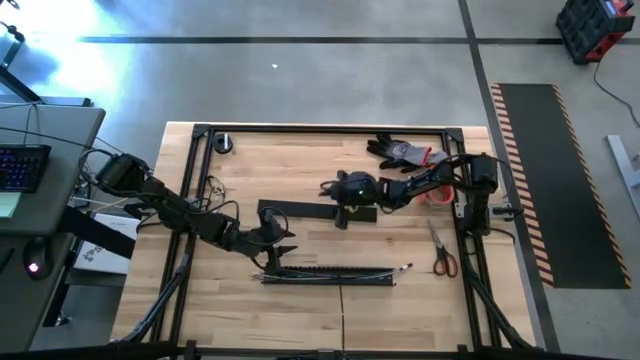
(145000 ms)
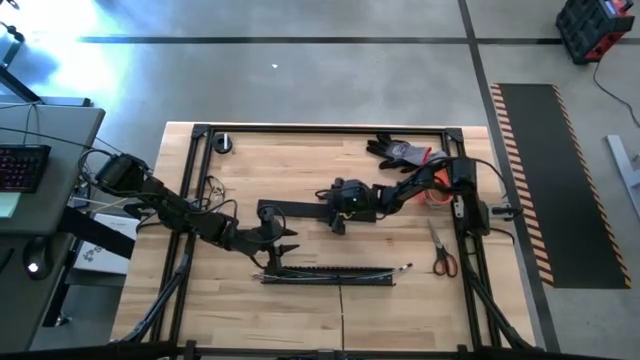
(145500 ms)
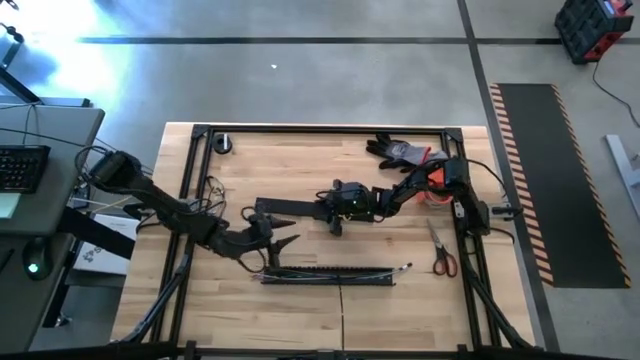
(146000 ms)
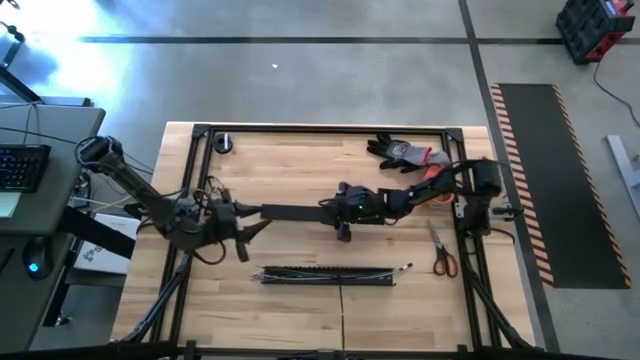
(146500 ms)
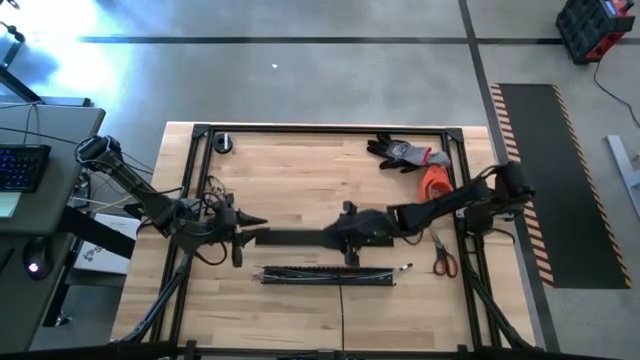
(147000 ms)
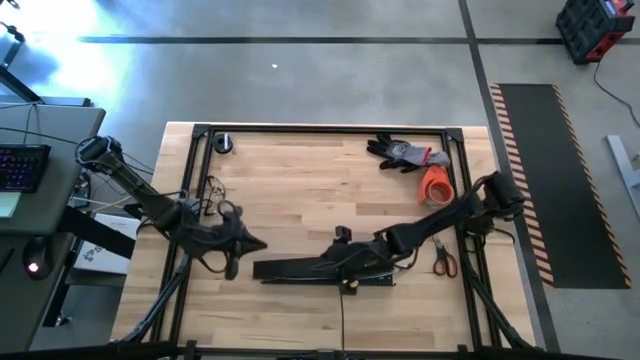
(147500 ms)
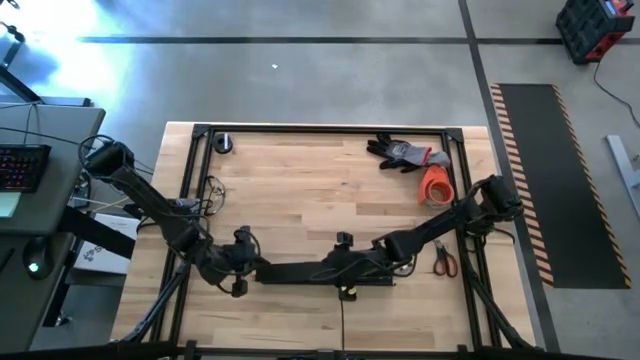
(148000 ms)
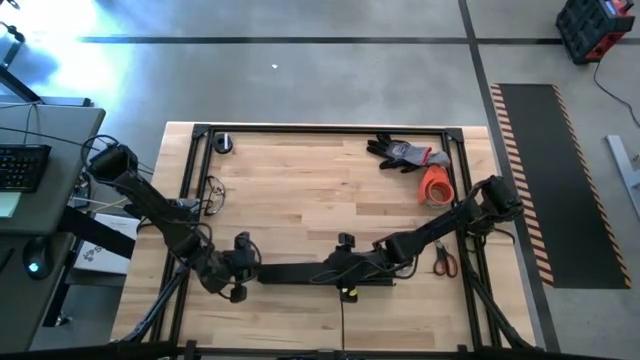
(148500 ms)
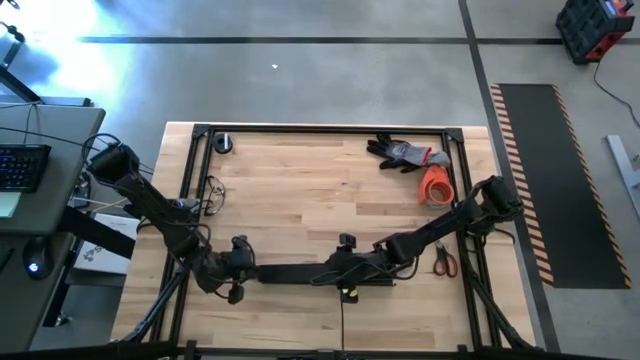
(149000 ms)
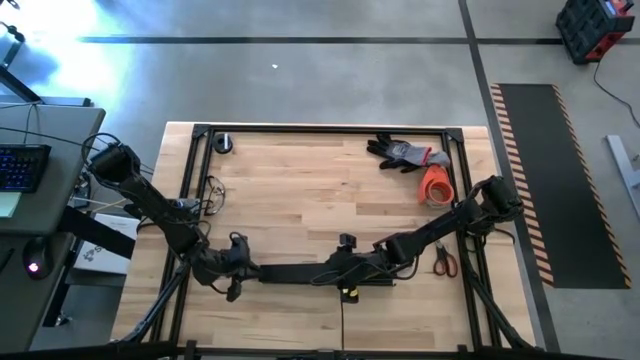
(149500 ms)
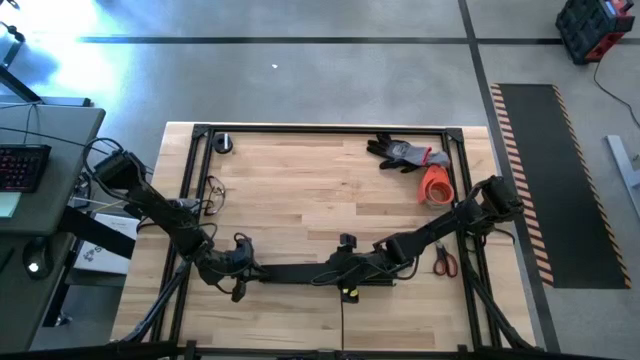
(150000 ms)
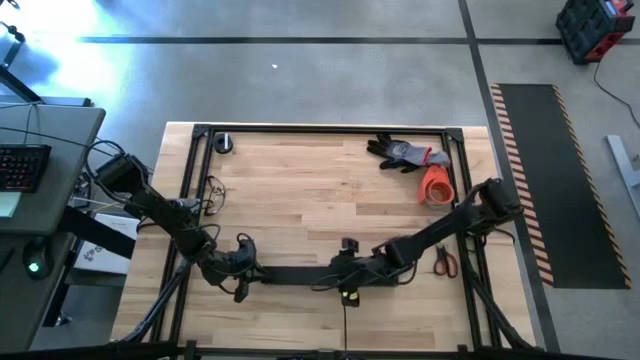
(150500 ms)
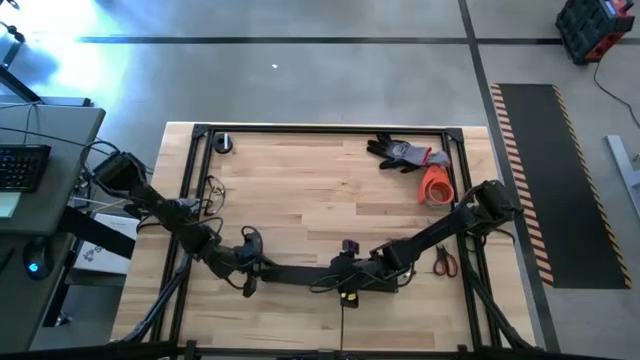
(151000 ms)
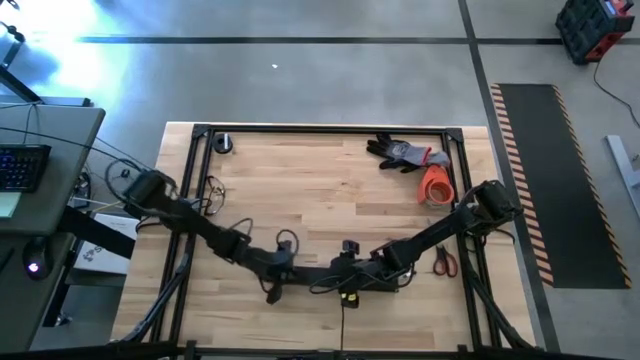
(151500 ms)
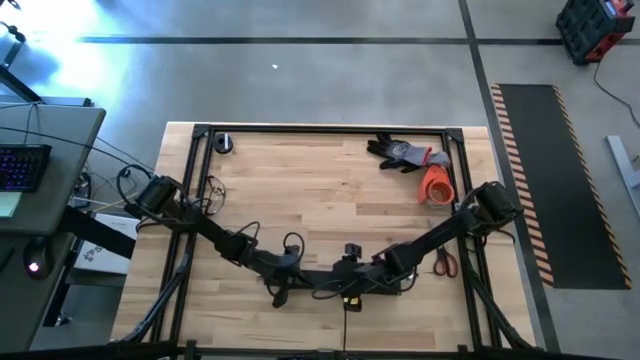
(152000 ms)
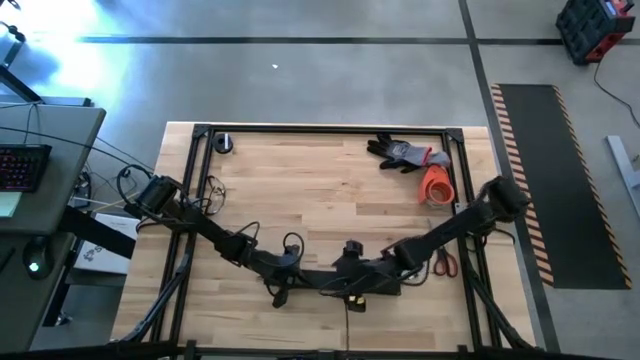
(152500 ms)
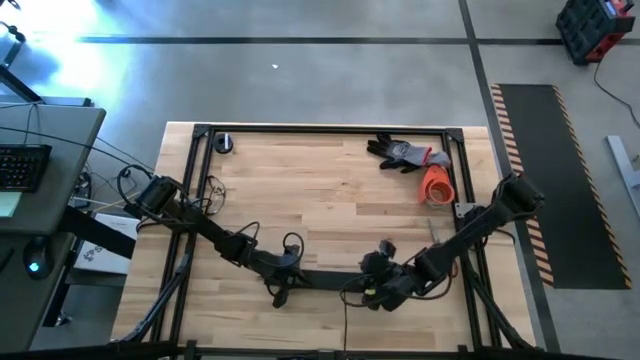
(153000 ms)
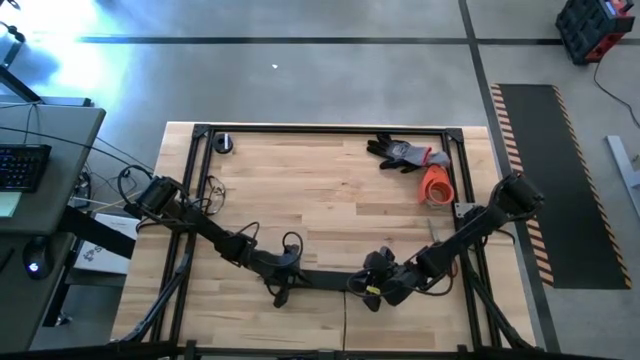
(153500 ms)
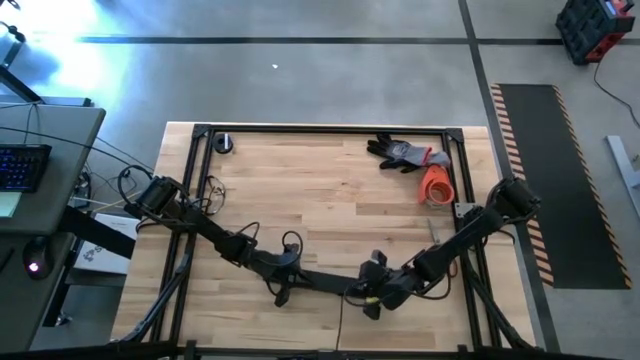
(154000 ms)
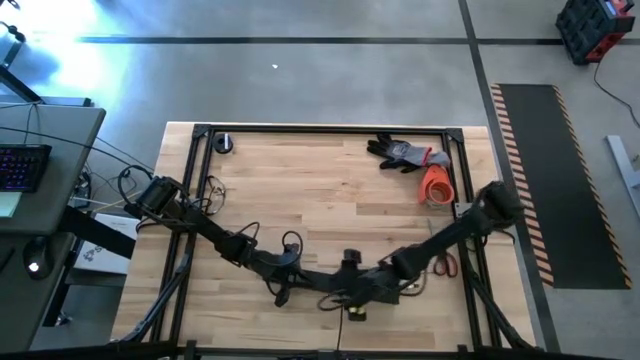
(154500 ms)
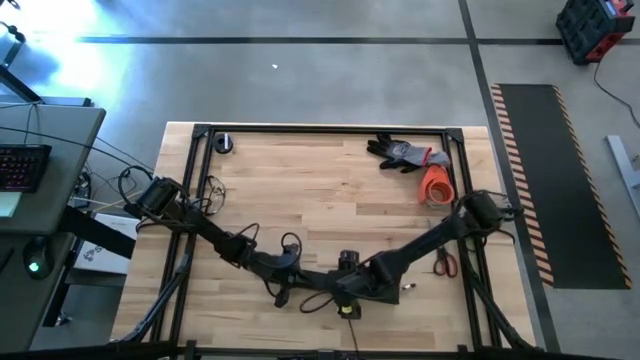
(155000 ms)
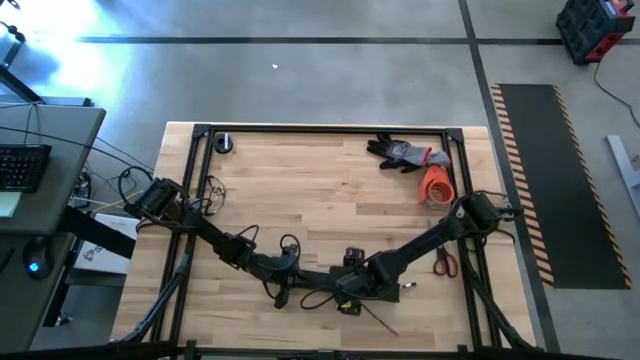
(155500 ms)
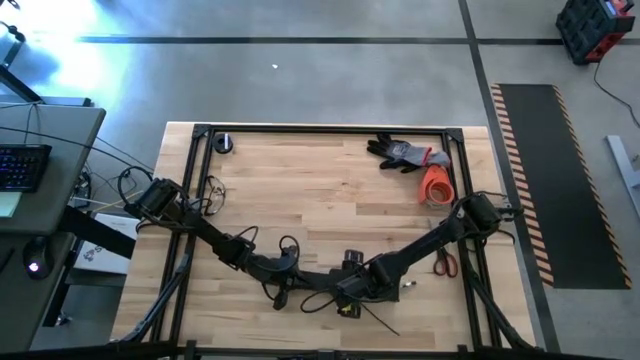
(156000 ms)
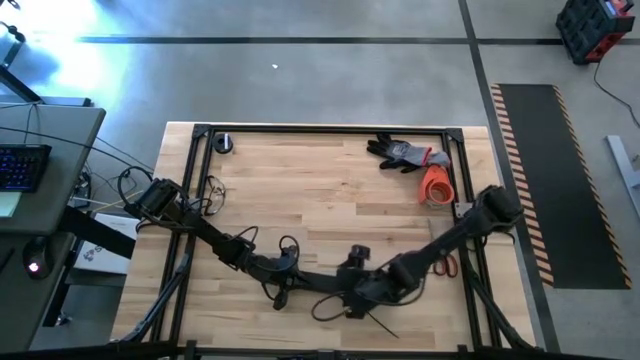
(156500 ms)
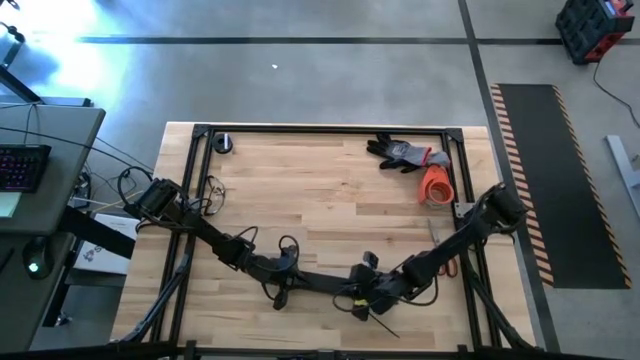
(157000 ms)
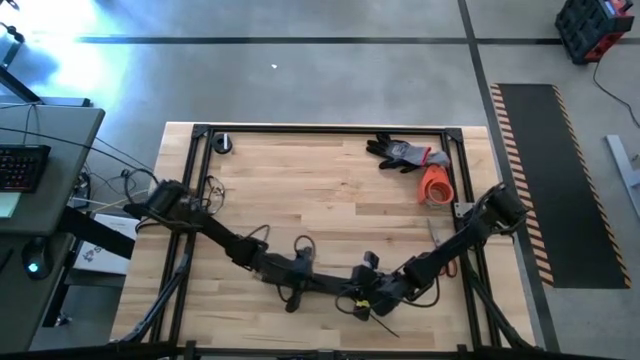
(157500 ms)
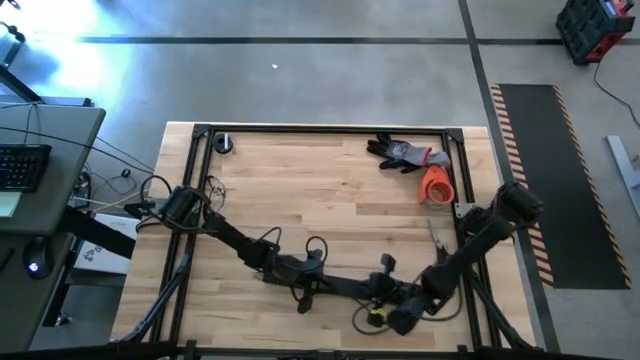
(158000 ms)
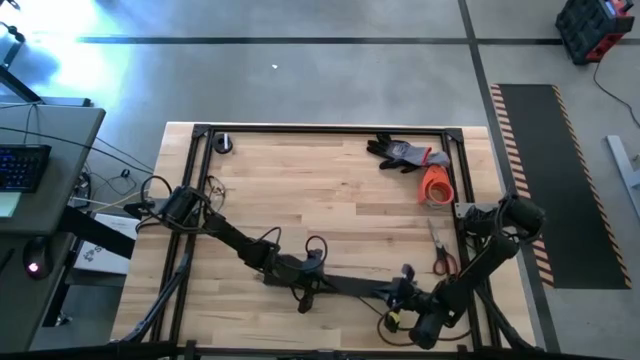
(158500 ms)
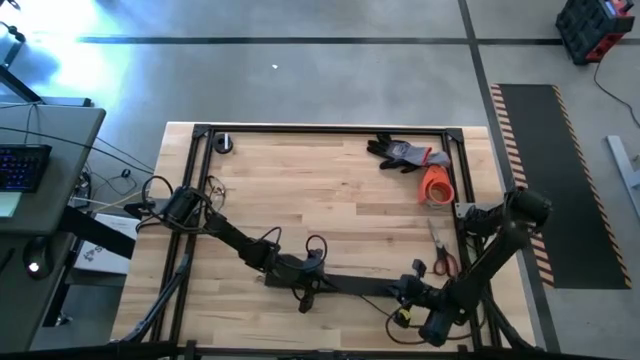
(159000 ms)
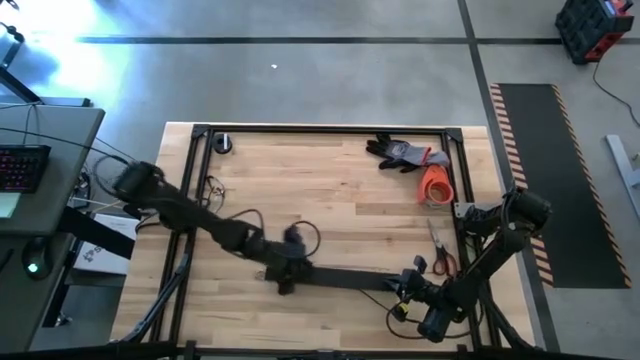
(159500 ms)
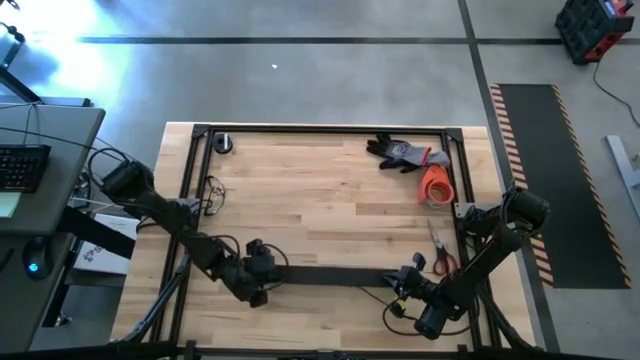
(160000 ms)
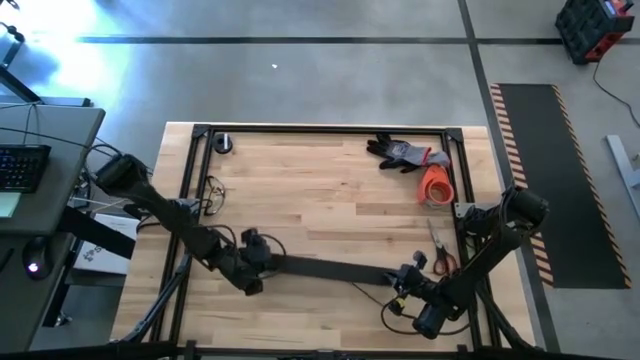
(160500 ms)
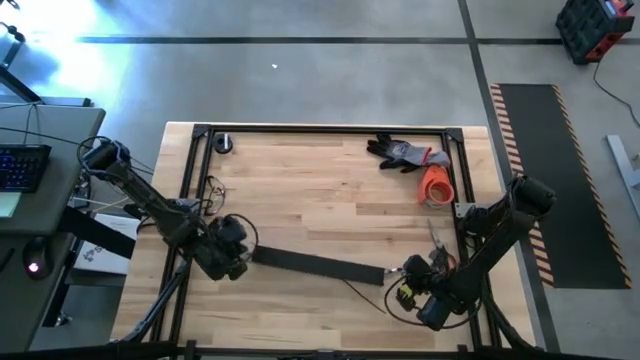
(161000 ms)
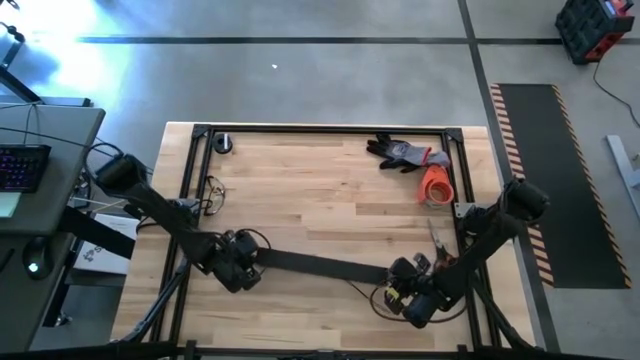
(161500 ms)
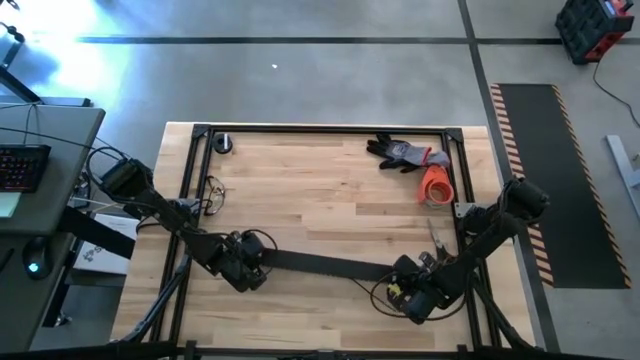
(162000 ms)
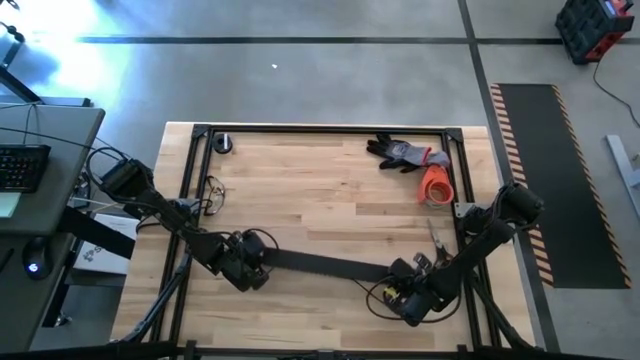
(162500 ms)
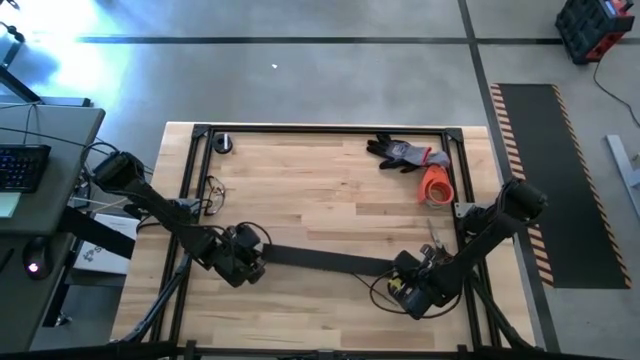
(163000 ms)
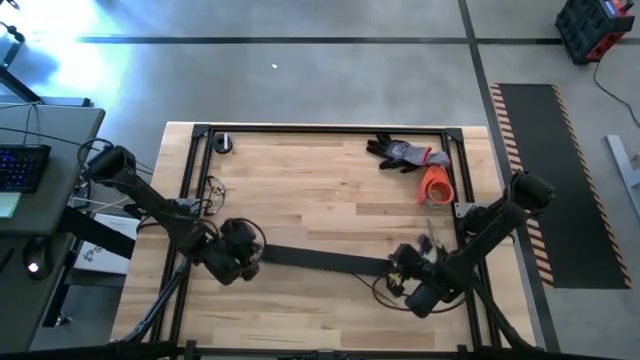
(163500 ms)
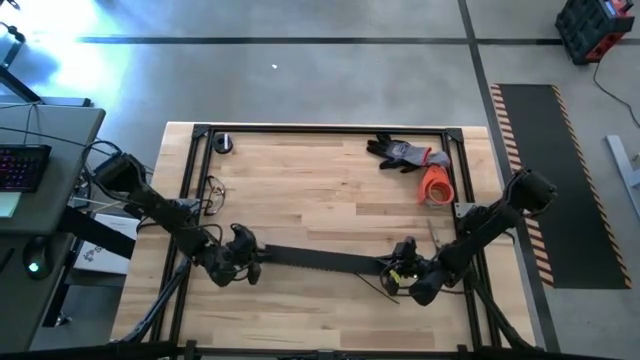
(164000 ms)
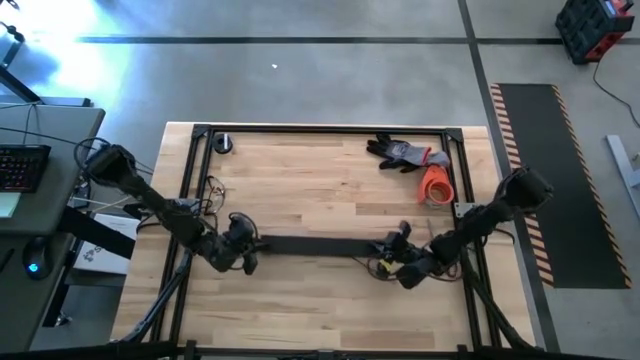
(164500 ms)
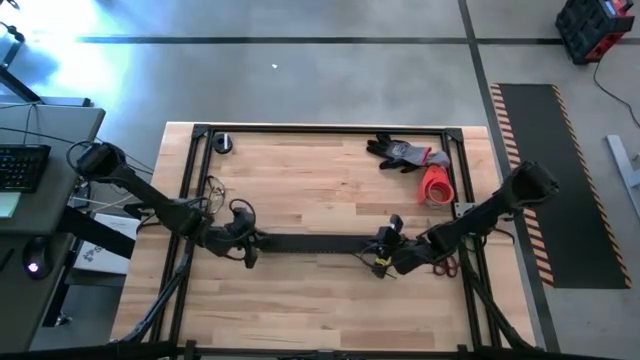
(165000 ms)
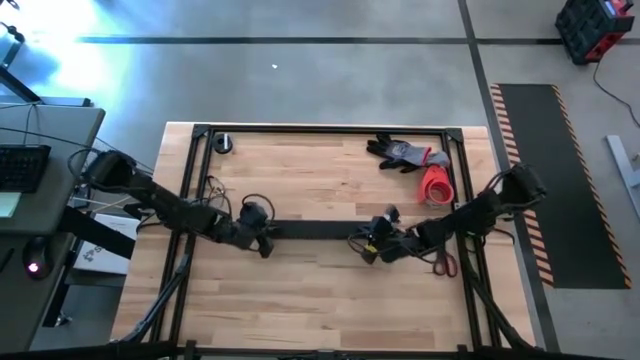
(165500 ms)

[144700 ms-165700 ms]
Task: Ziptie cables
Close the black cable duct
